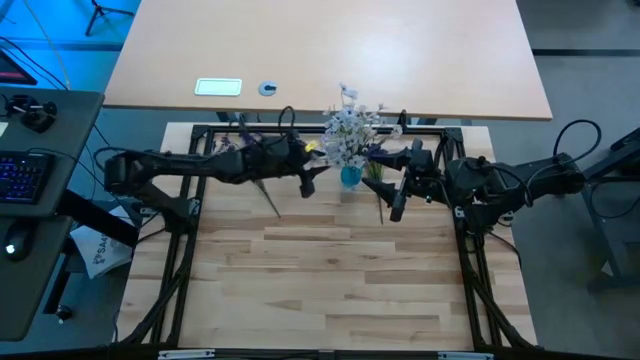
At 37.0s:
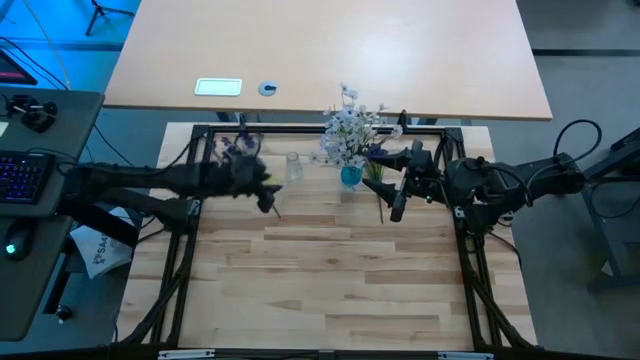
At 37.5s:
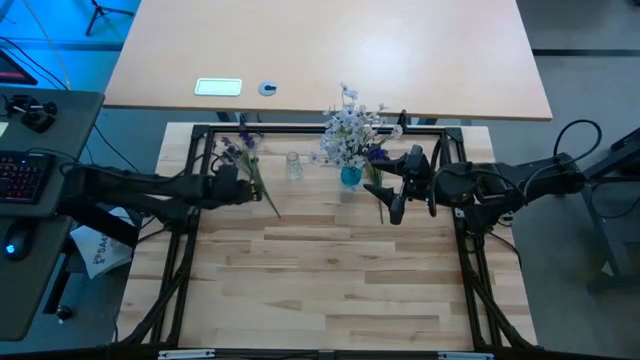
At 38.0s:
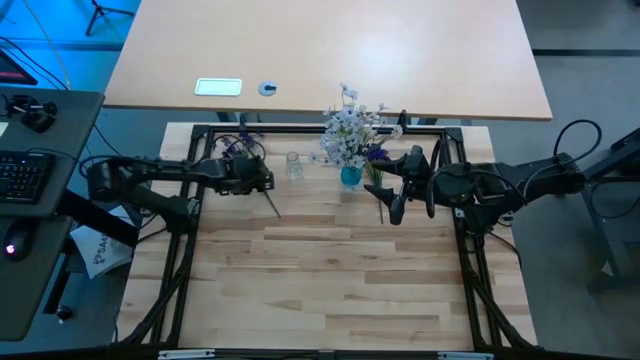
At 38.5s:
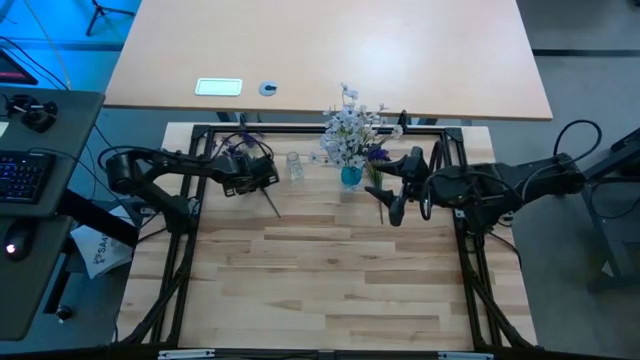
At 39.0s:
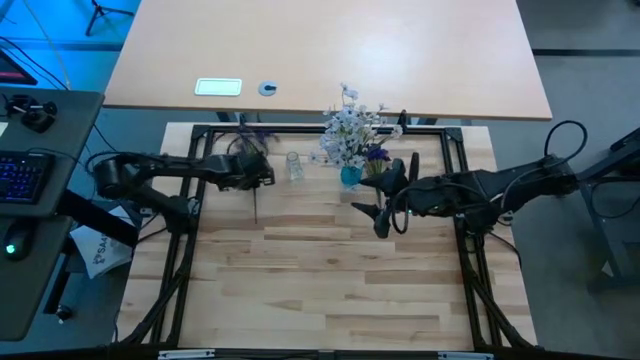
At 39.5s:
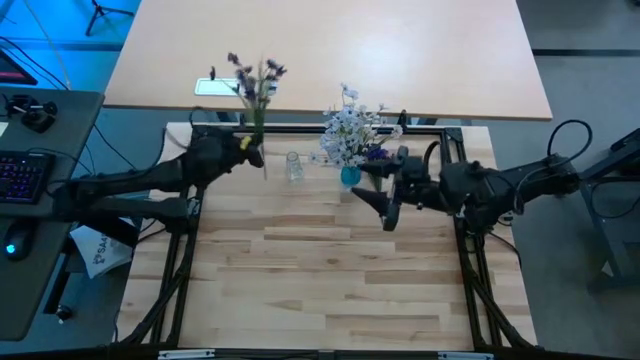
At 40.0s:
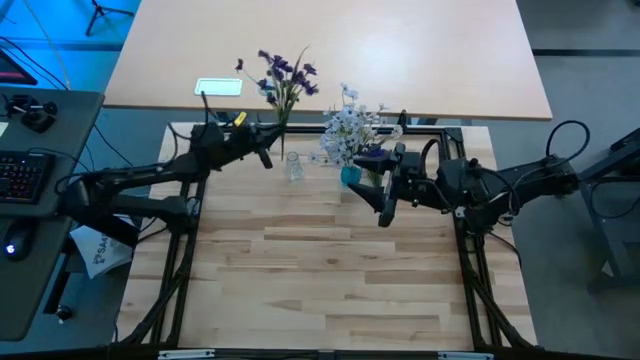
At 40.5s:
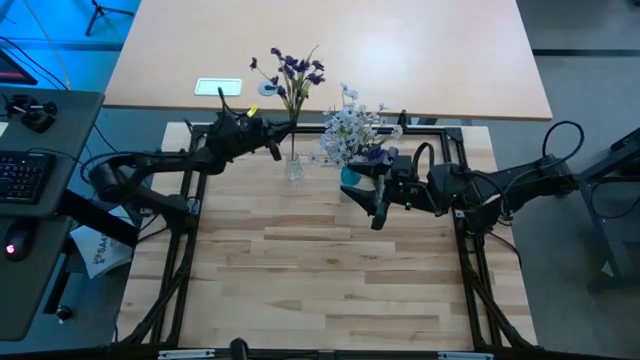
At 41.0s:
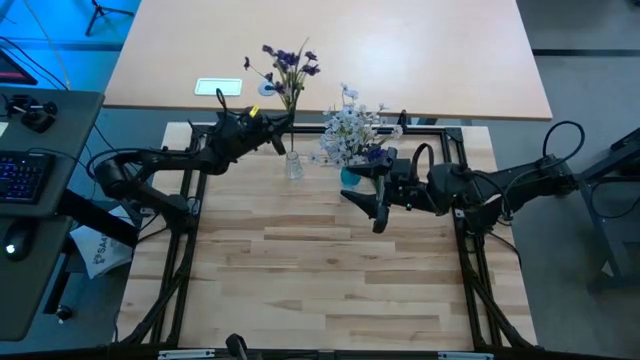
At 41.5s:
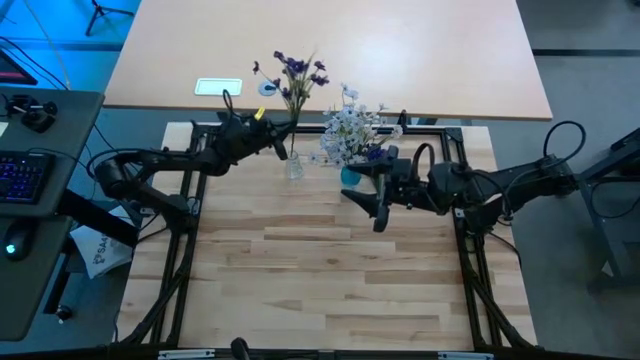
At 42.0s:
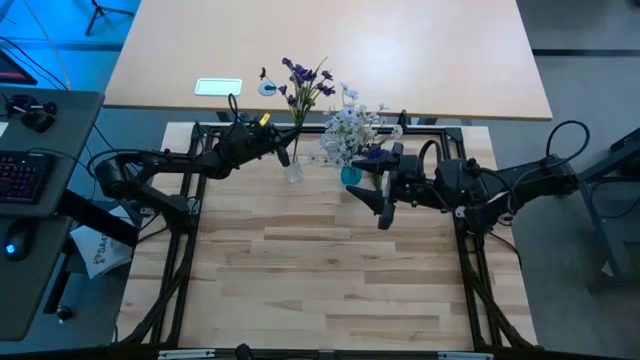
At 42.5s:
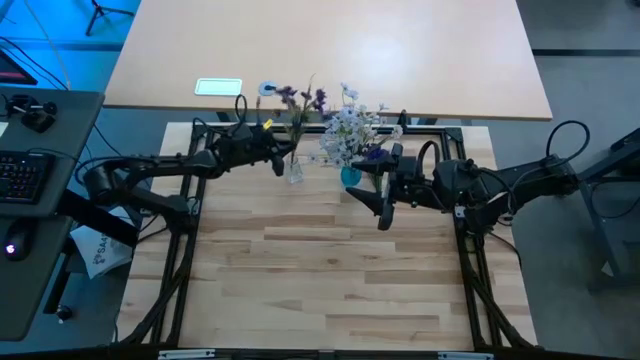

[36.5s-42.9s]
Task: Sort flowers into vase by color
Put the left purple flowers into the transparent vase

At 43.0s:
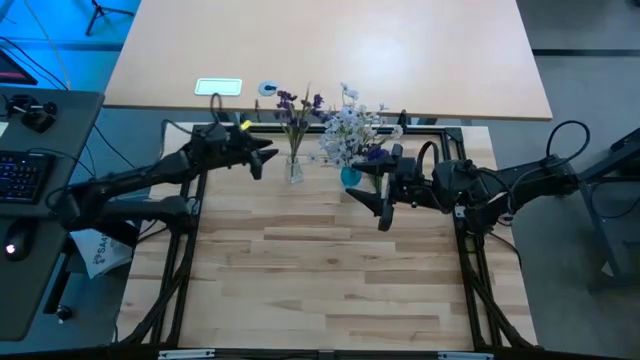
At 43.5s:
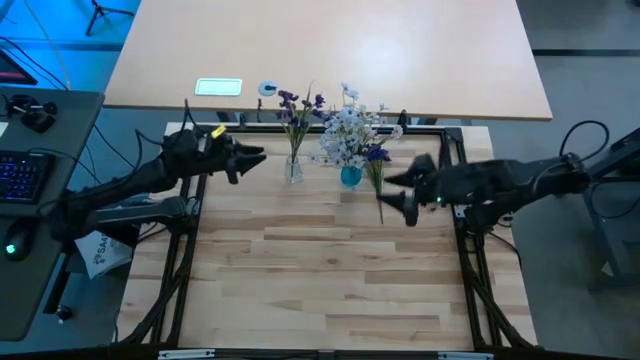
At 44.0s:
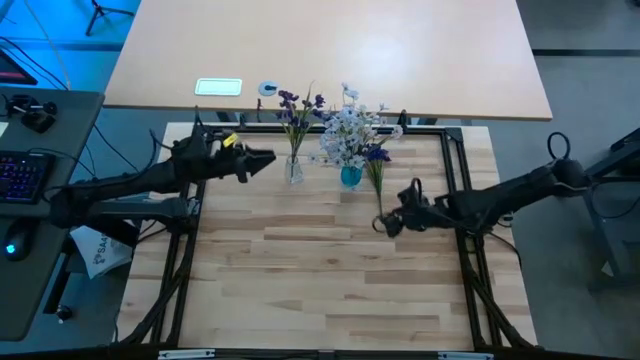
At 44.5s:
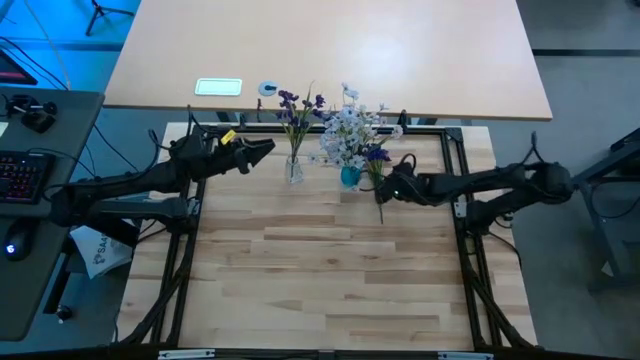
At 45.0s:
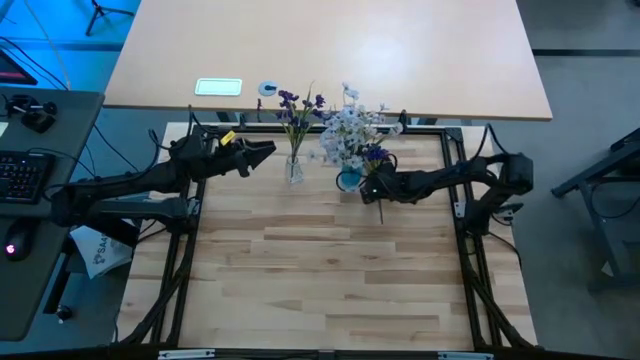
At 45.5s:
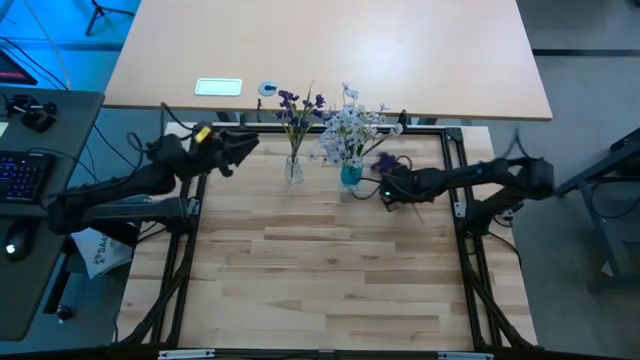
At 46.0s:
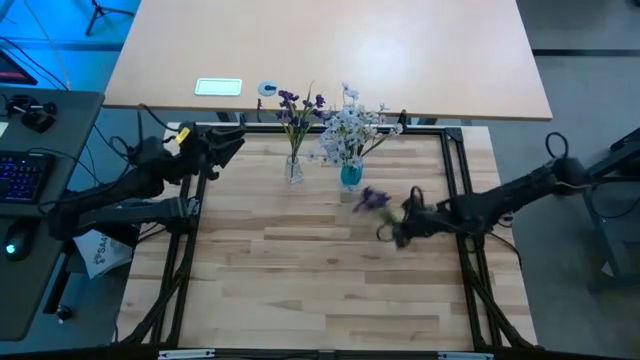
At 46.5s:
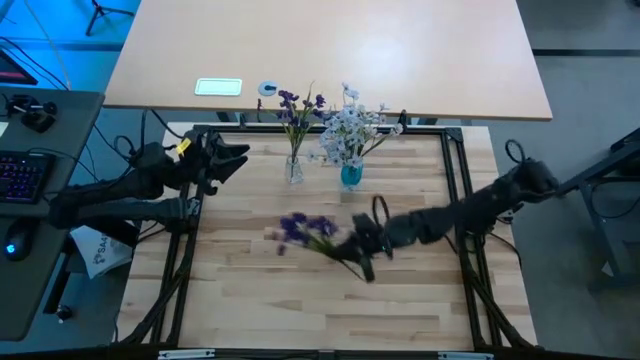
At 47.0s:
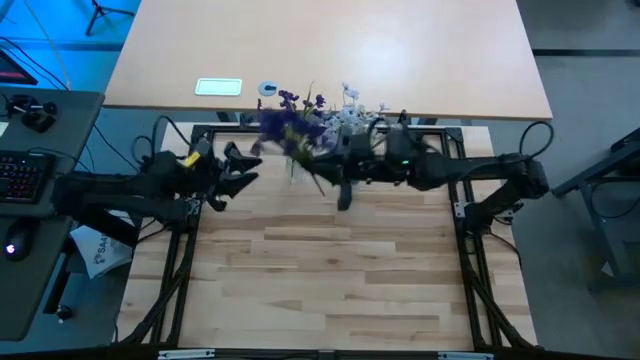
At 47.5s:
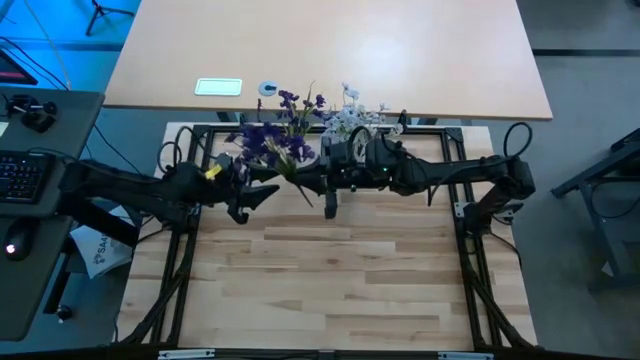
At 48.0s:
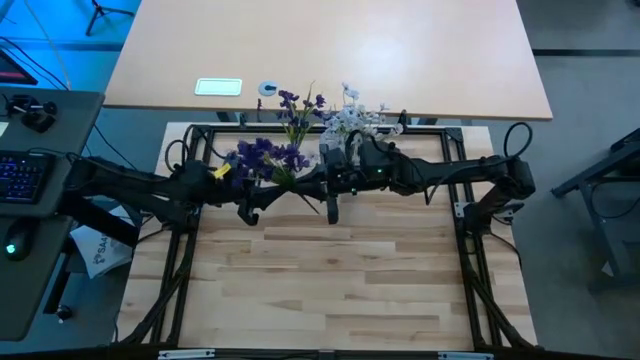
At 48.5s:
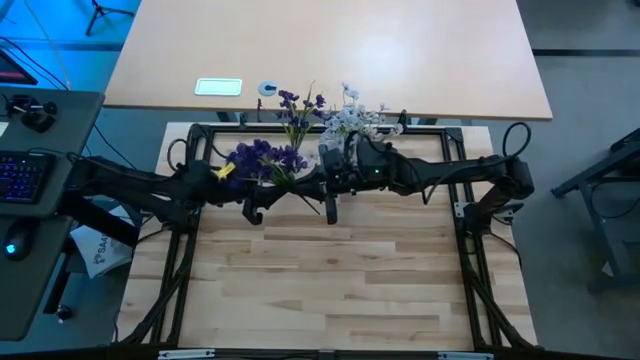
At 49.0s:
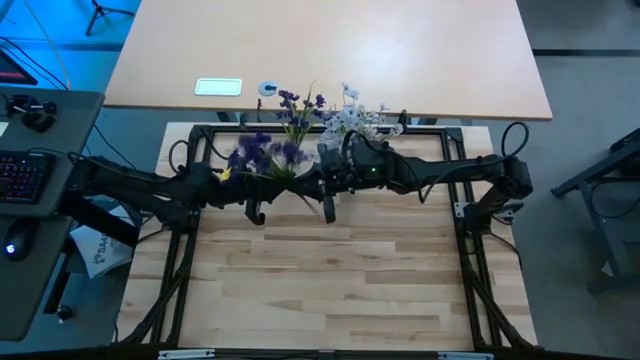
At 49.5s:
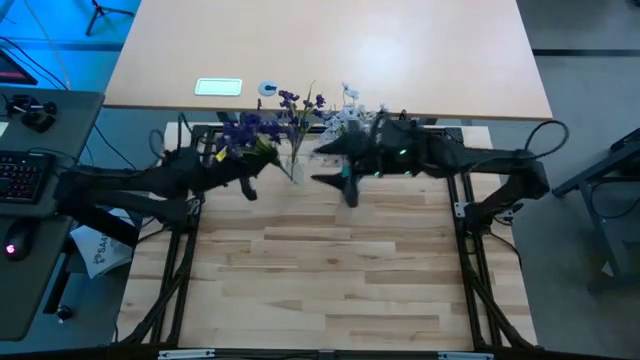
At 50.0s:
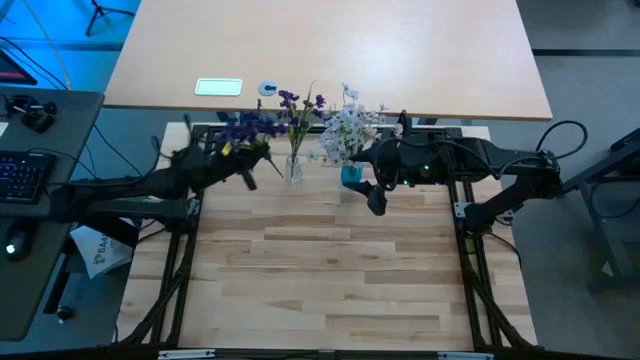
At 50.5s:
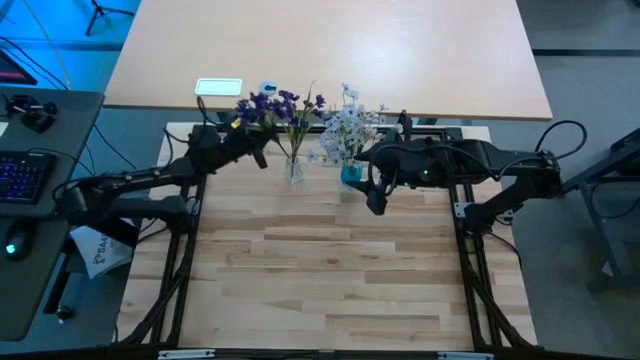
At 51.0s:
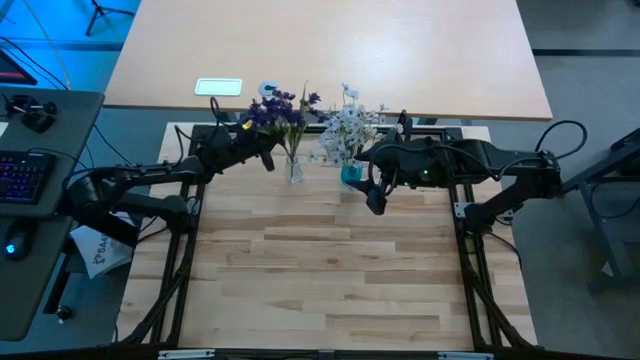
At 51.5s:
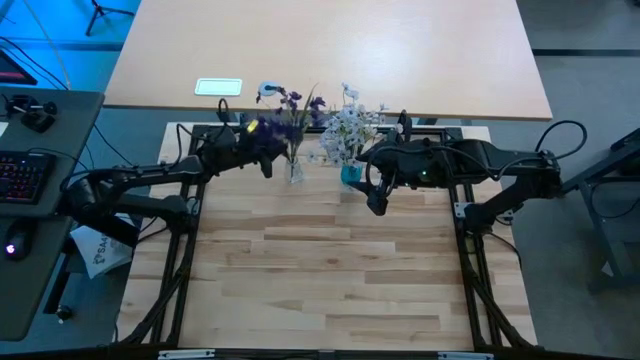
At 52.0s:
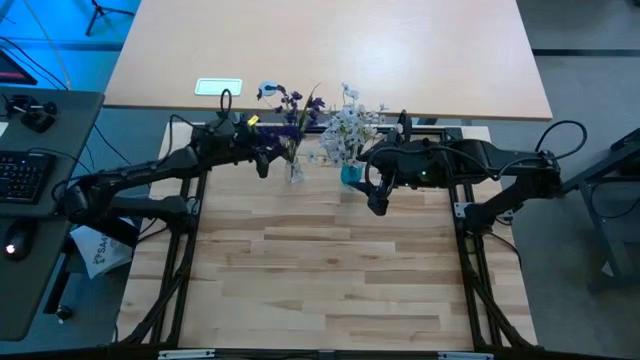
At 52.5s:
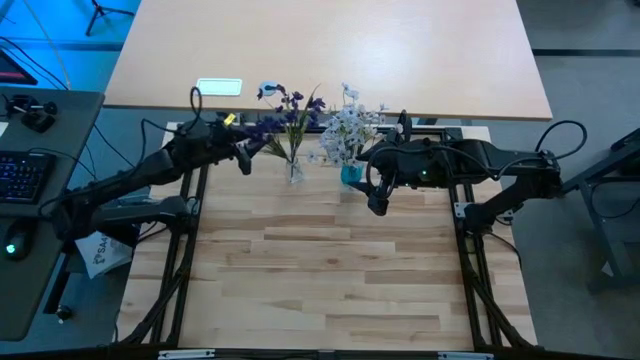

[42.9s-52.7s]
Put the purple flowers into the transparent vase

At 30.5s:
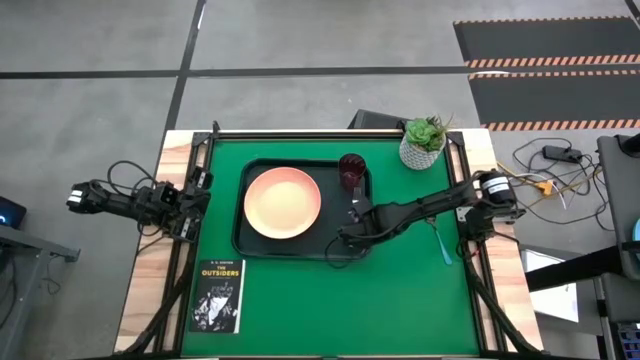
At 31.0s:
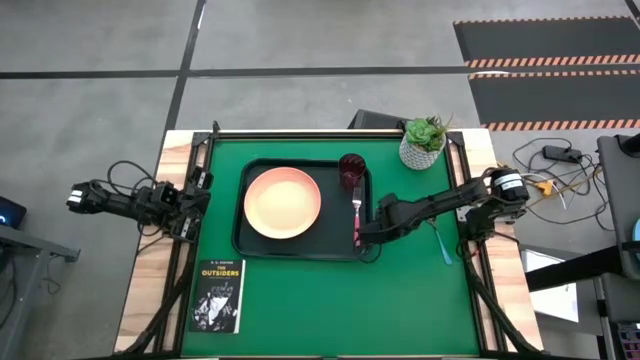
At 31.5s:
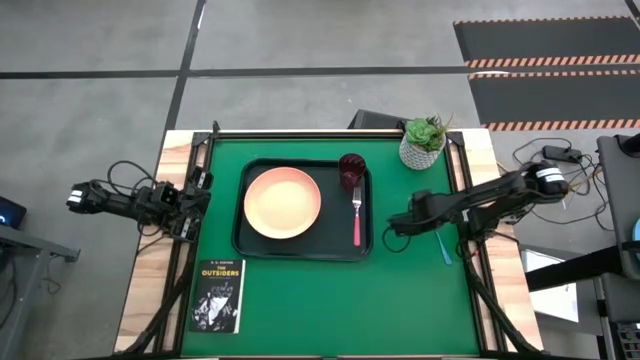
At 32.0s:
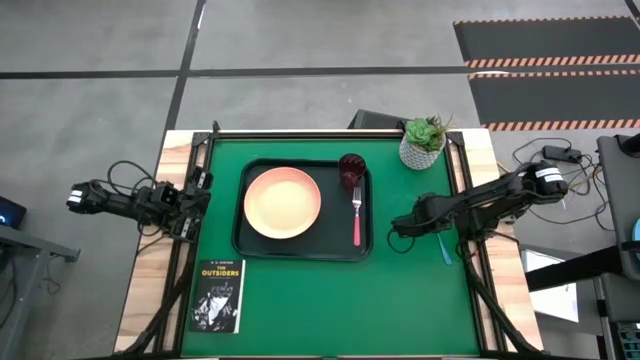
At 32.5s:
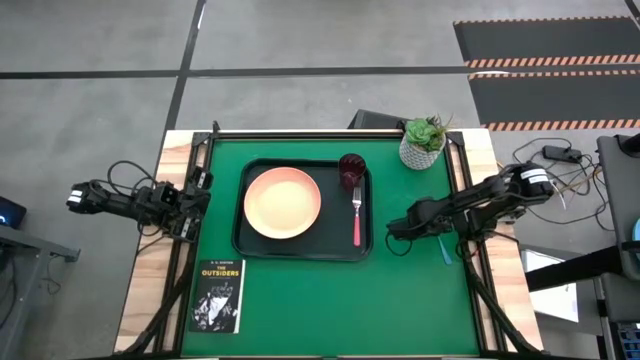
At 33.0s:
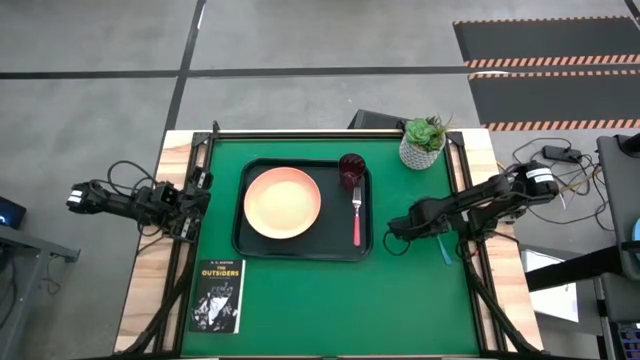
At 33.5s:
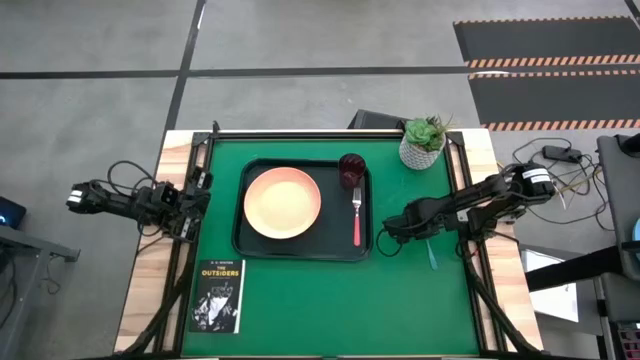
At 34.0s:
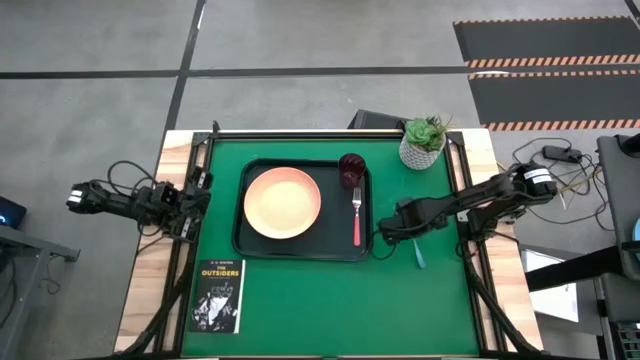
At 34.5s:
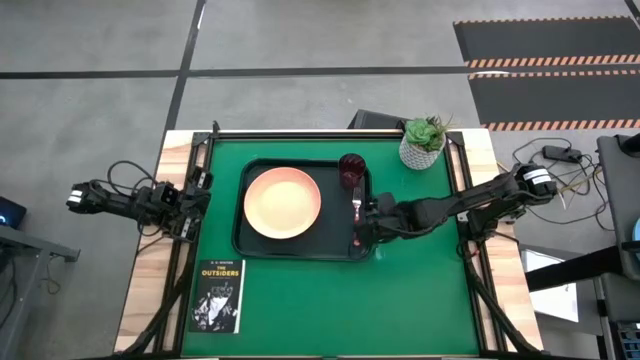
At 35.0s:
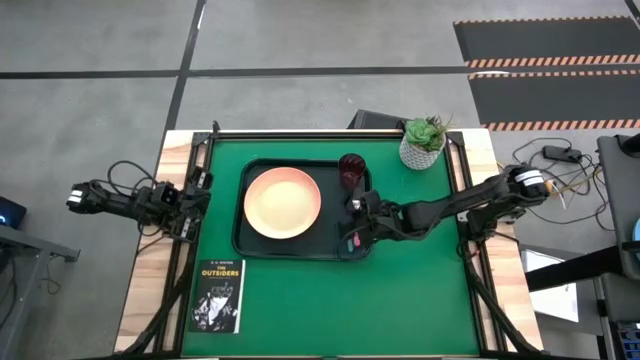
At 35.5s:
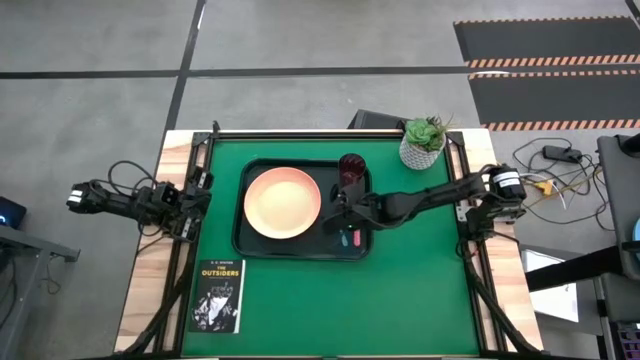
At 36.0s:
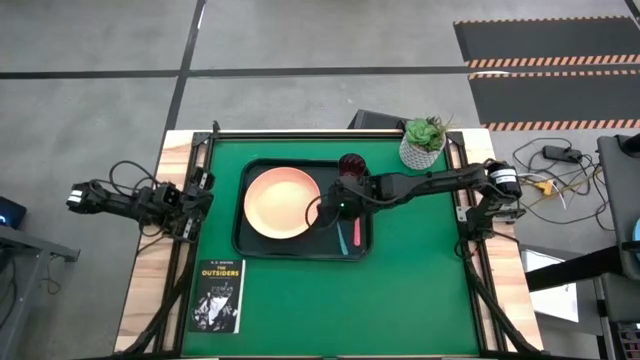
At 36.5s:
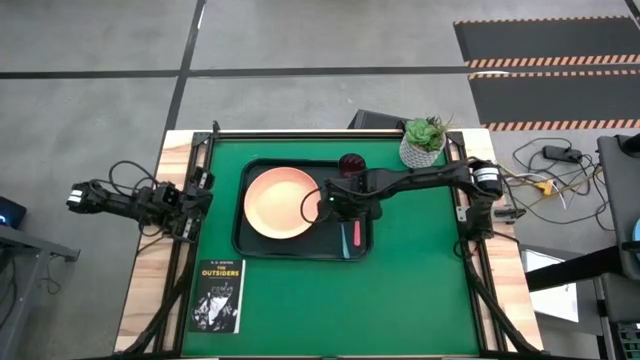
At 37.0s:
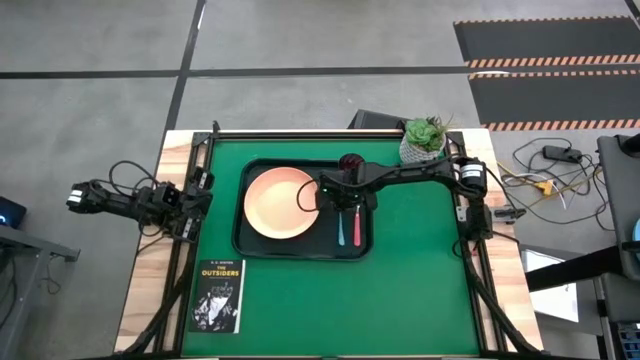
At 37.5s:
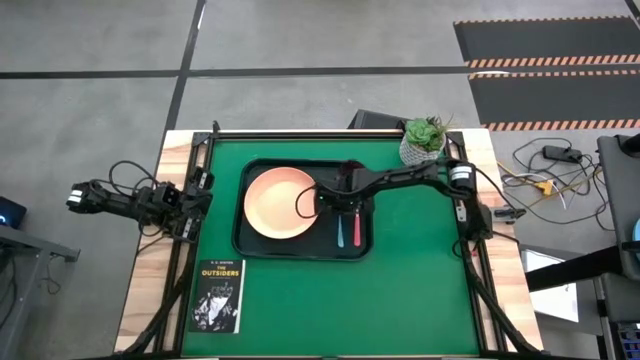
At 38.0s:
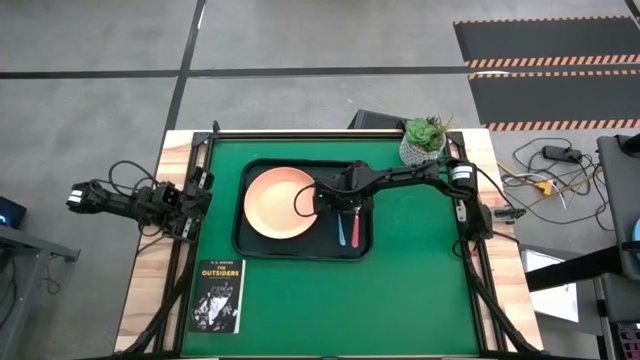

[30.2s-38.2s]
Task: Pick and place plate/cup/fork/spoon on tray
Put the blue spoon on the blue tray
